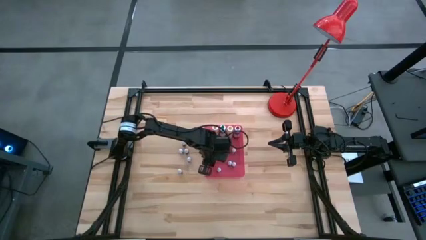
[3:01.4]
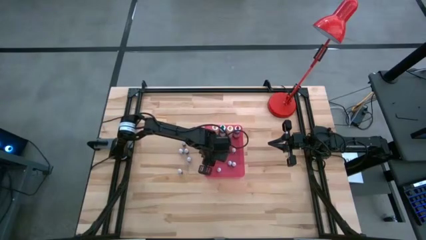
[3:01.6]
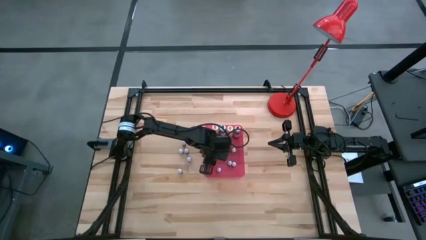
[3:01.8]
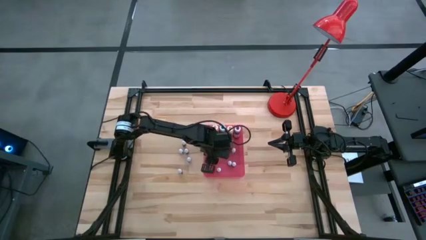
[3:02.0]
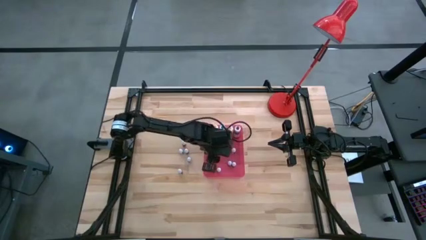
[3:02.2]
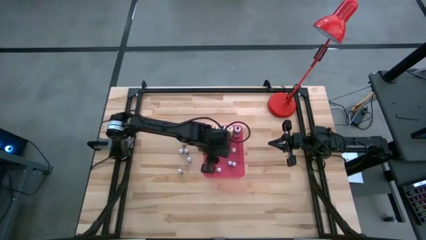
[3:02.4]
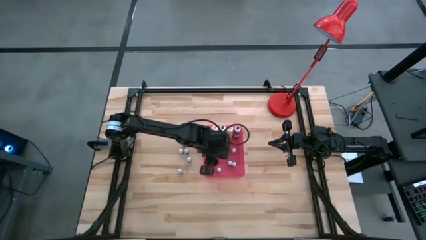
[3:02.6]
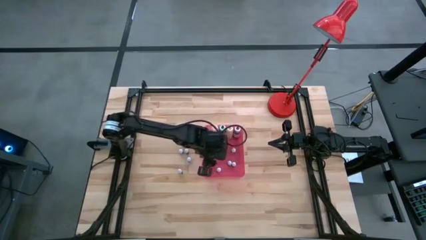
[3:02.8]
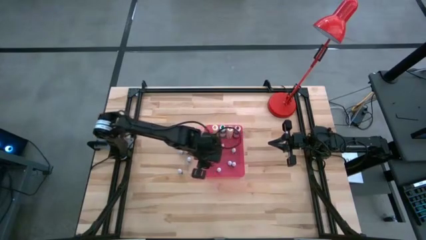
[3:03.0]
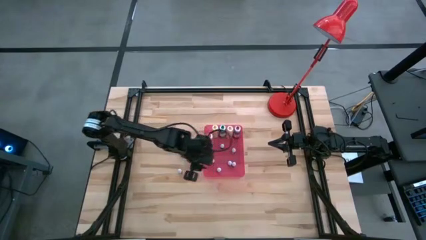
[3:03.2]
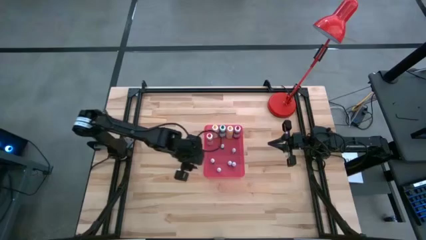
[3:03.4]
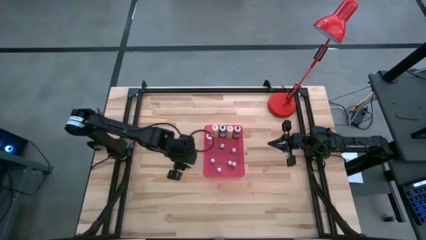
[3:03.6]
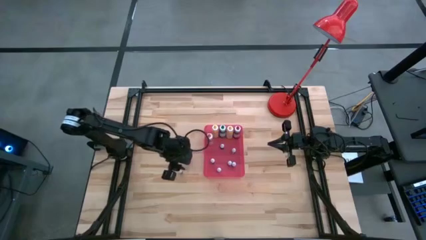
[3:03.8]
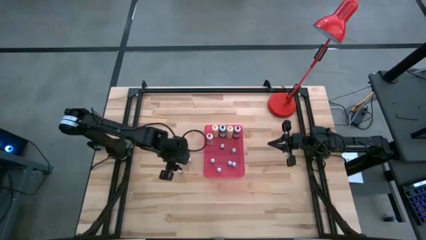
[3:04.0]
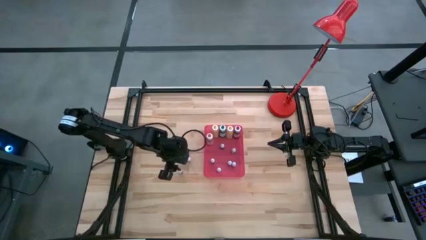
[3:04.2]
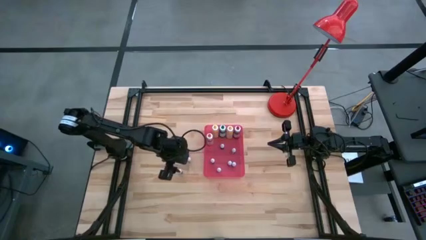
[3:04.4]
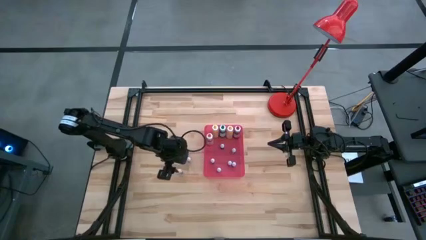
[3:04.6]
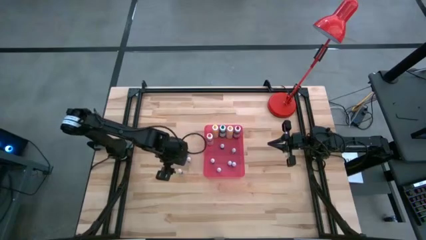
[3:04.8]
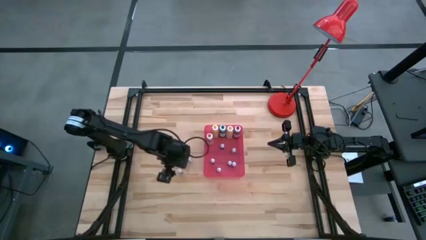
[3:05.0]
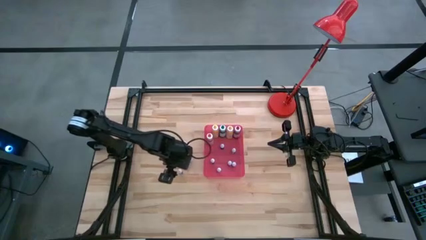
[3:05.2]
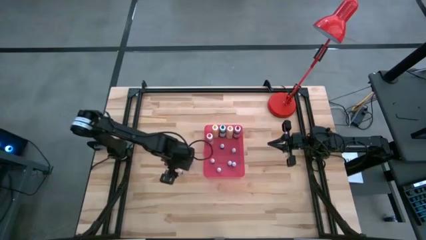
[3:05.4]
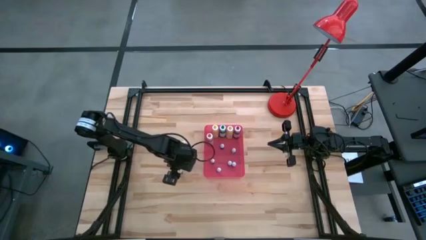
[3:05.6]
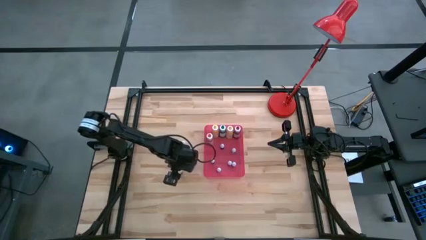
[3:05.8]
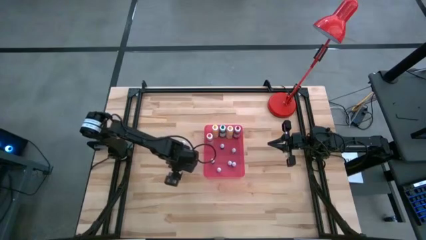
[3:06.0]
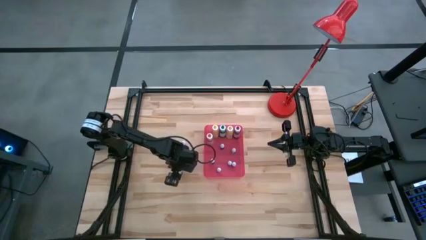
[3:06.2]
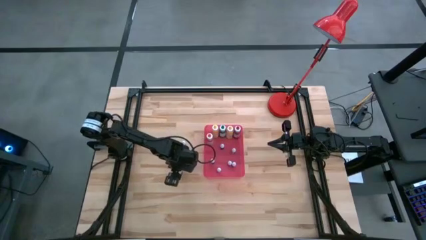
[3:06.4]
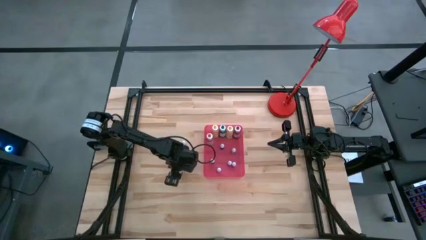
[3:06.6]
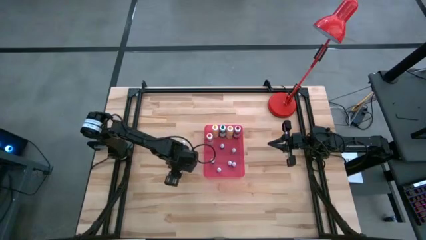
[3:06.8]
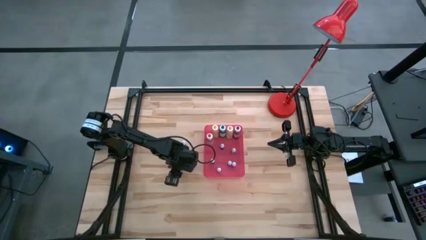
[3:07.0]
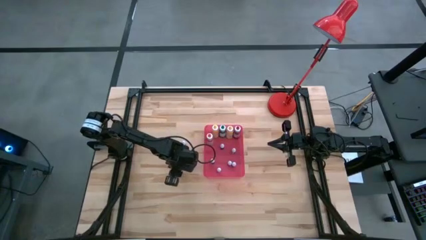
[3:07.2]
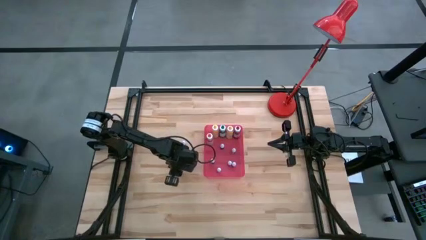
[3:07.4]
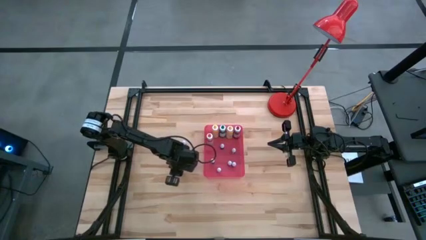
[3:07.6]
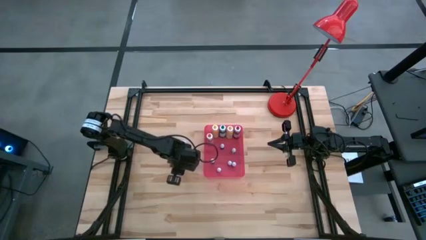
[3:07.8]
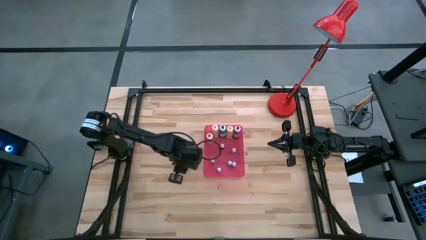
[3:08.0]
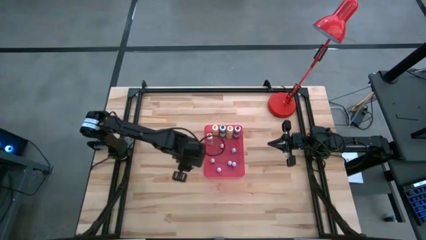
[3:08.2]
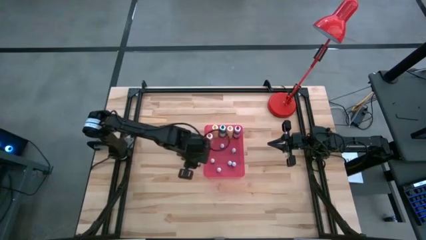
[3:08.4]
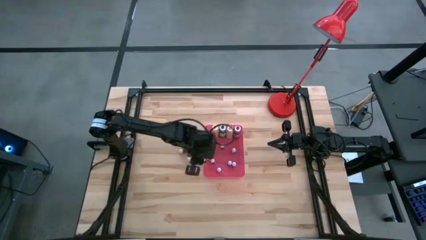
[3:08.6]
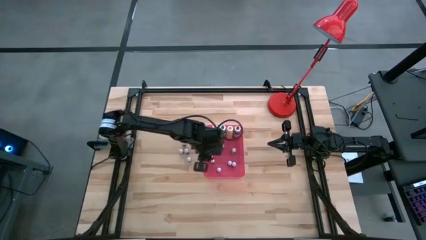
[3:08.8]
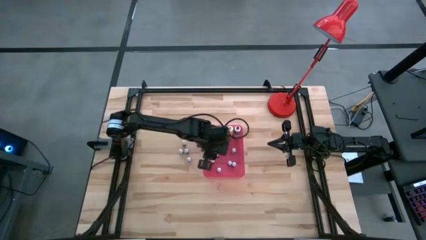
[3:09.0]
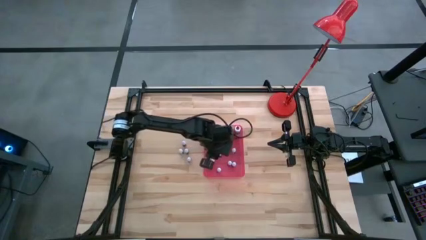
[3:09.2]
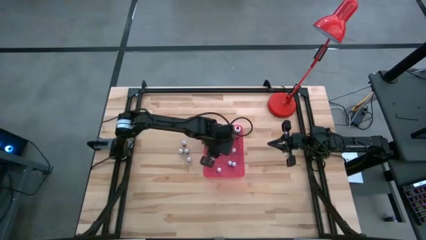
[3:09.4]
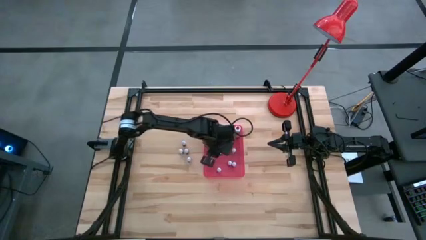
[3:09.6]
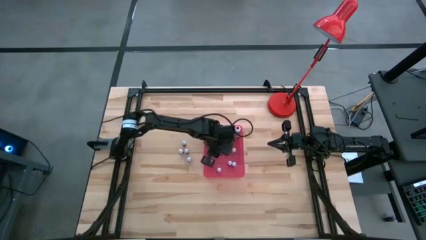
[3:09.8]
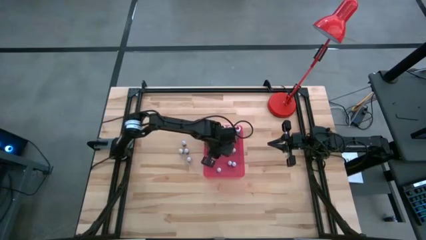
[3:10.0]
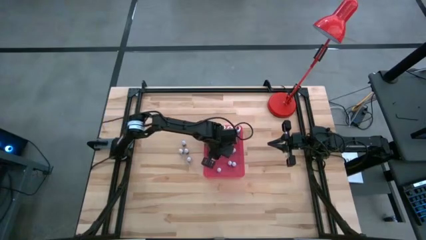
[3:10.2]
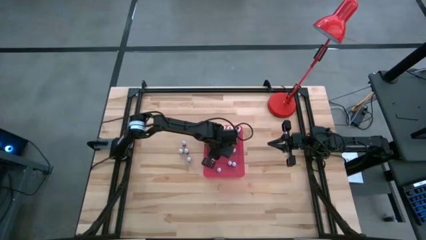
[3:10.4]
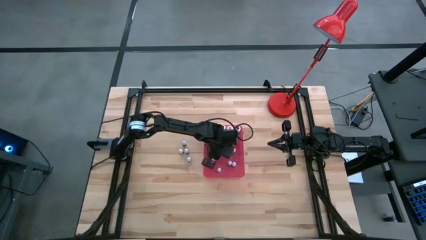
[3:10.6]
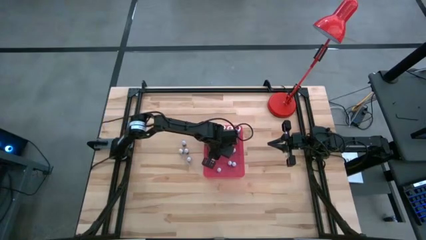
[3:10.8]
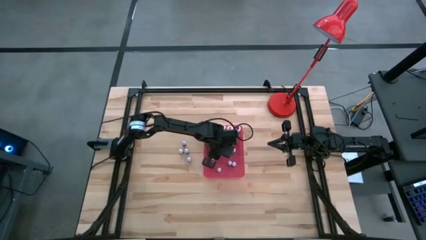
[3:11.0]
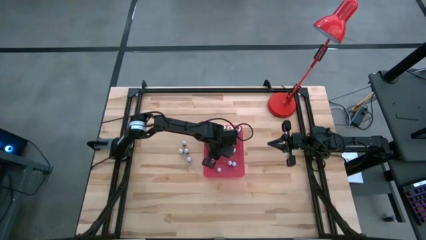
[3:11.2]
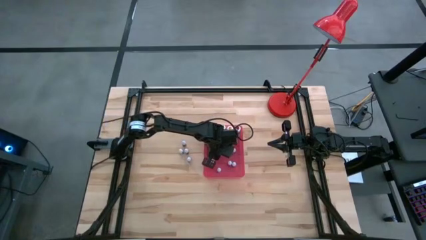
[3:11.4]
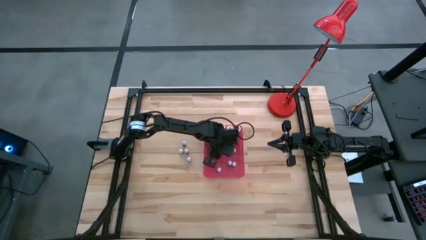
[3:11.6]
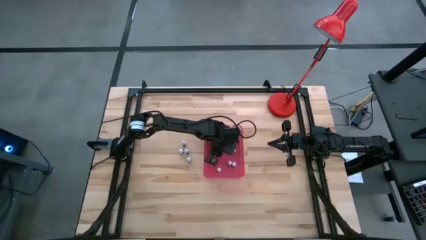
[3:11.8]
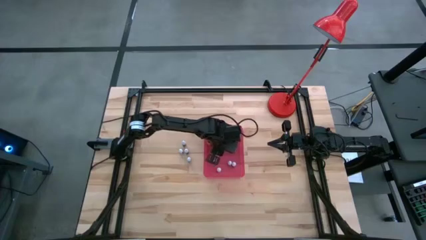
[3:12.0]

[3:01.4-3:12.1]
Task: Pick & Place food coloring
Put the small food coloring bottle into the red bin

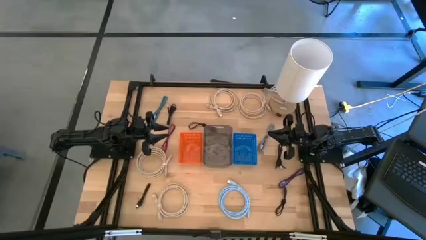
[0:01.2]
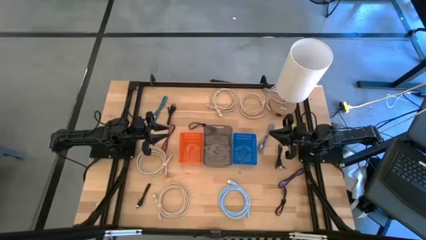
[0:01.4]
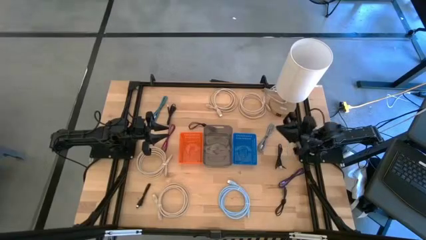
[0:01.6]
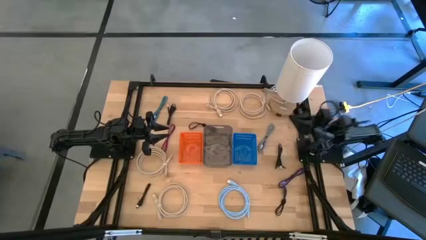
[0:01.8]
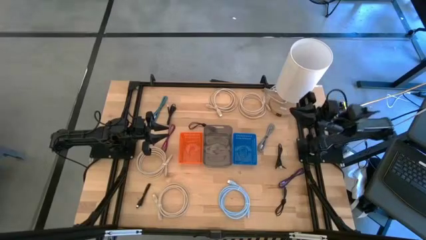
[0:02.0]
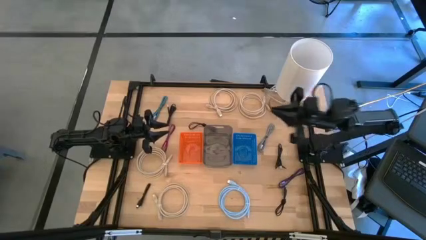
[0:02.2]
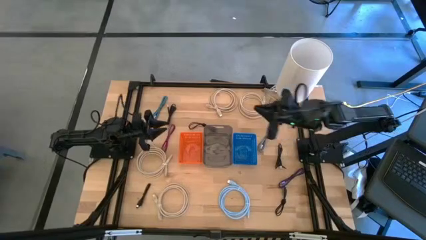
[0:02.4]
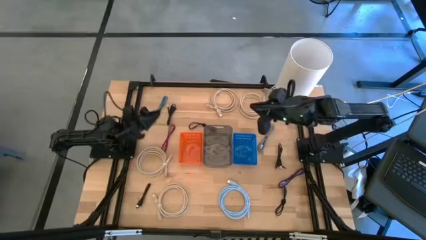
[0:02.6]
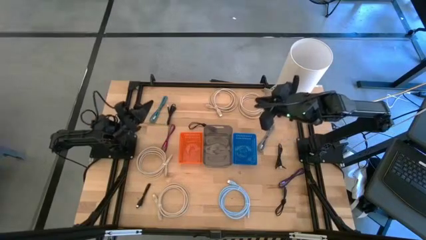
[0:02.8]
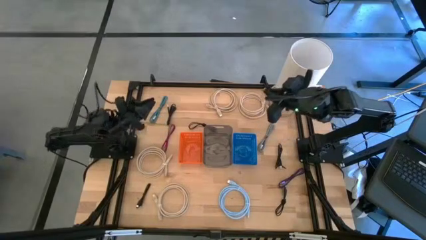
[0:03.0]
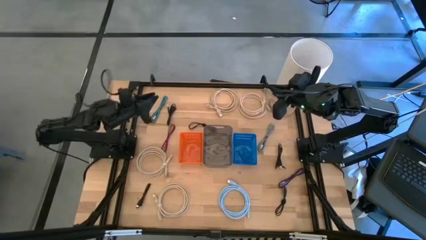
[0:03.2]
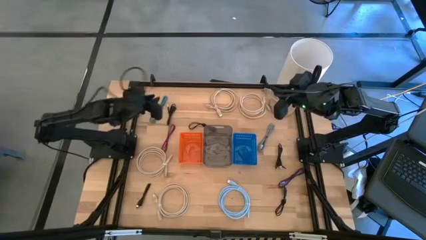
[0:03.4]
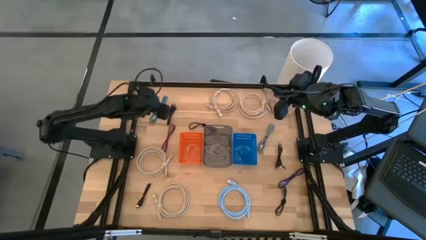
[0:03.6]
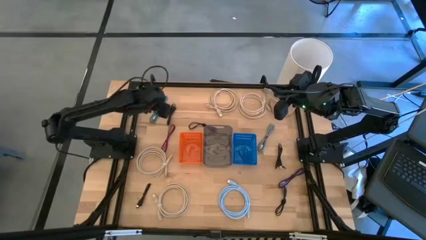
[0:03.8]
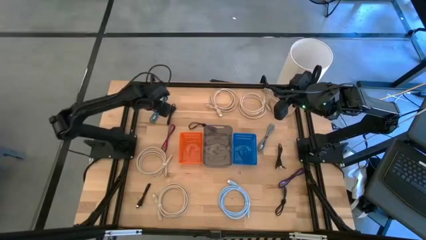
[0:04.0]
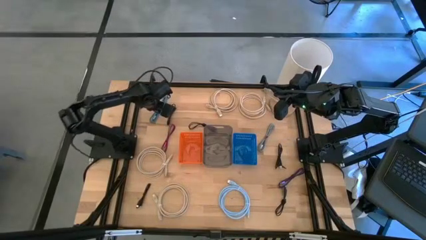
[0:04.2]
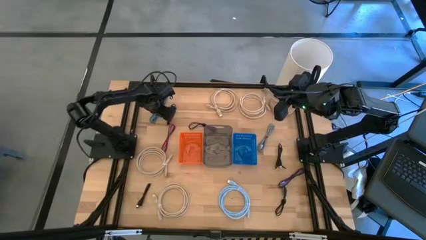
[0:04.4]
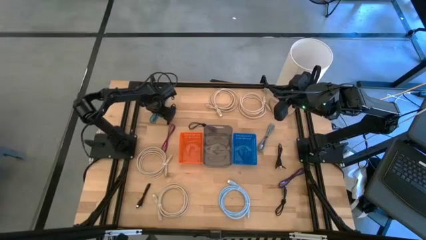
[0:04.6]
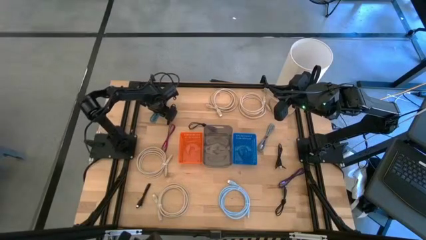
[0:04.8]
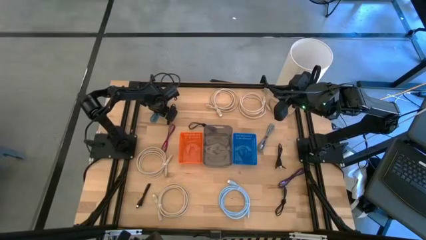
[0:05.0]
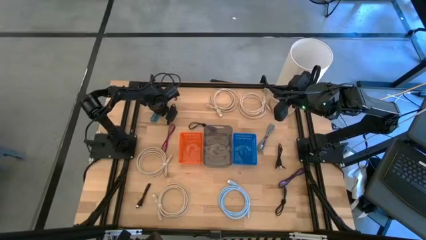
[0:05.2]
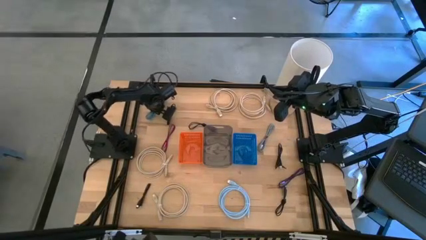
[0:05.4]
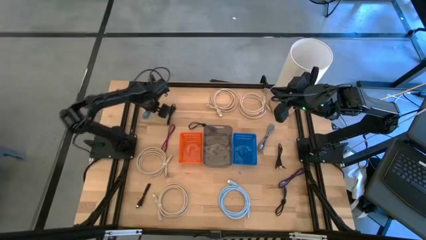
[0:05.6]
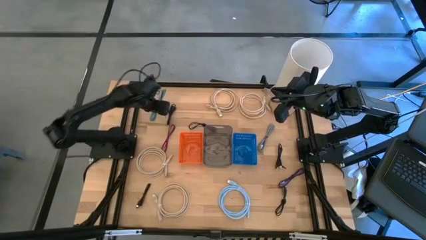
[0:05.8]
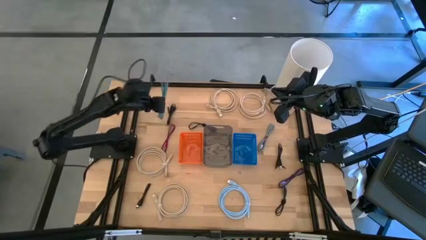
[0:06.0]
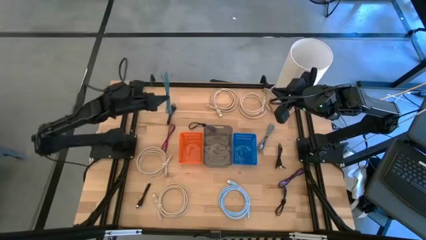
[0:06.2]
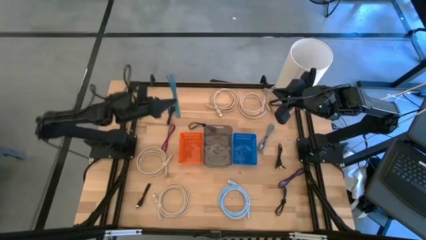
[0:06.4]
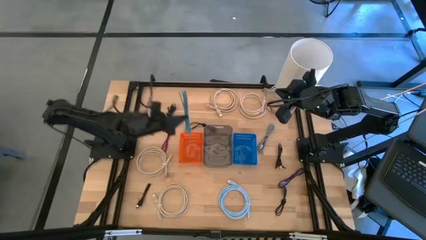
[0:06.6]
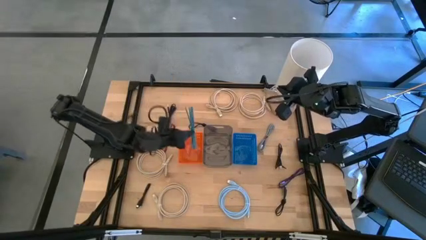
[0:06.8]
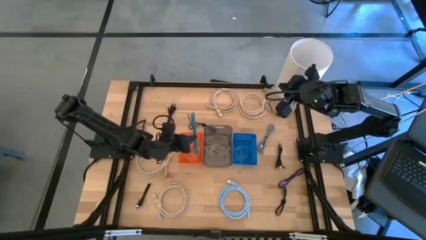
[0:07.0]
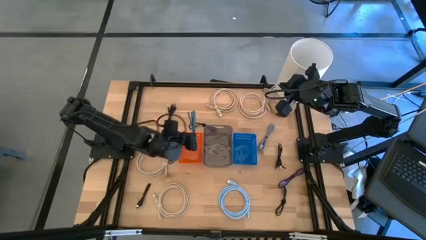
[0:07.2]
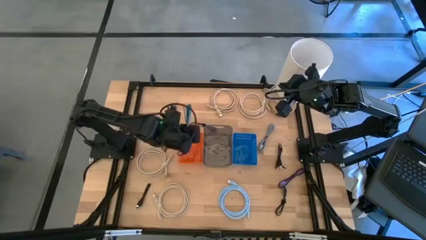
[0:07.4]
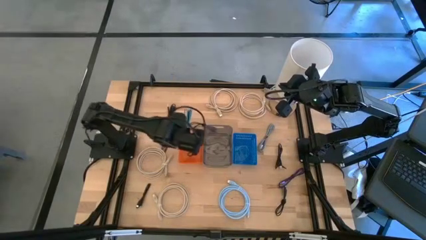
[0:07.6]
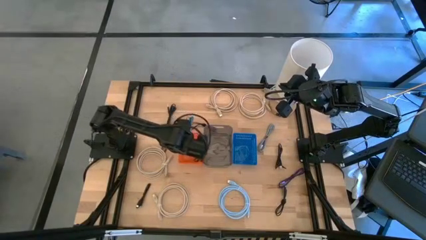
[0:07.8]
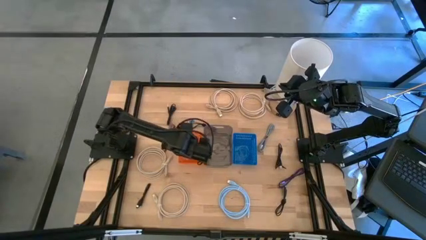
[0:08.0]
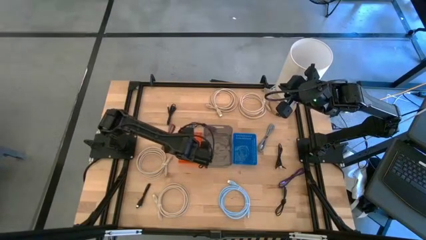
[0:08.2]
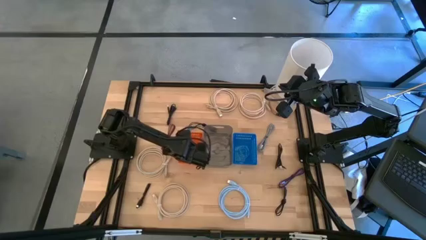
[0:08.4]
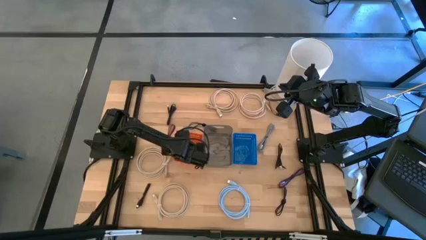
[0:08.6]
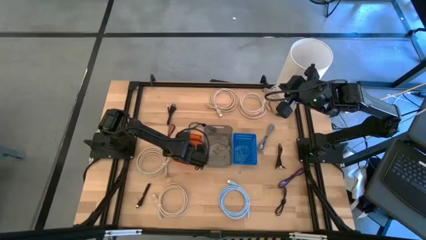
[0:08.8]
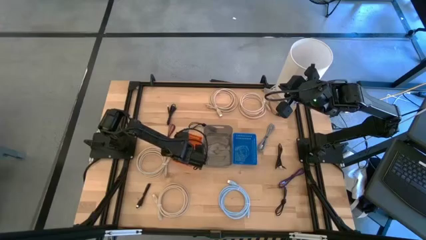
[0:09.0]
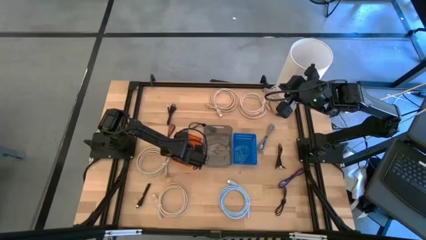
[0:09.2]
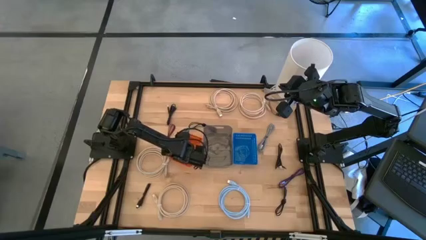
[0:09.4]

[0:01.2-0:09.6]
Task: Pick & Place USB Port
Put the blue and white charger cable into the orange bin
